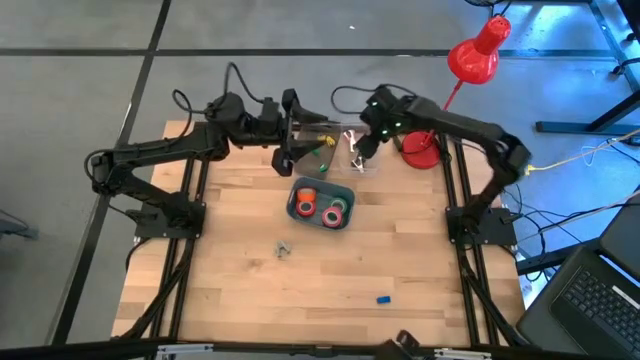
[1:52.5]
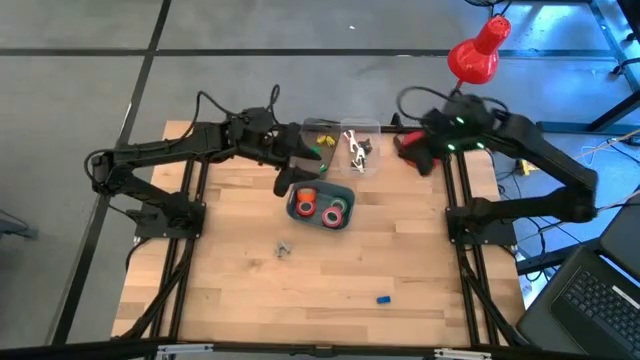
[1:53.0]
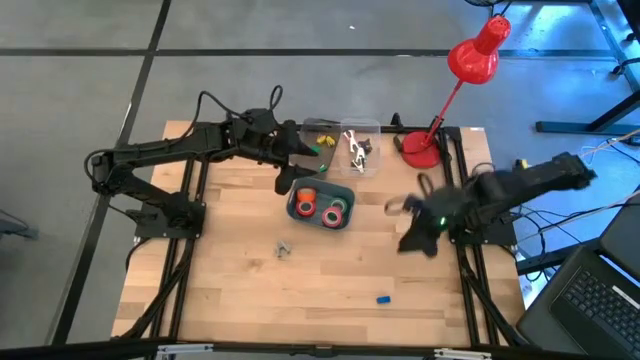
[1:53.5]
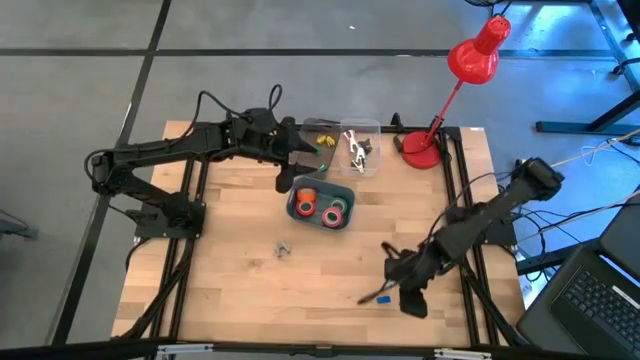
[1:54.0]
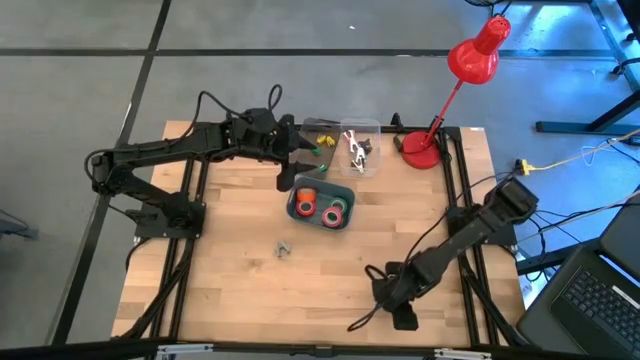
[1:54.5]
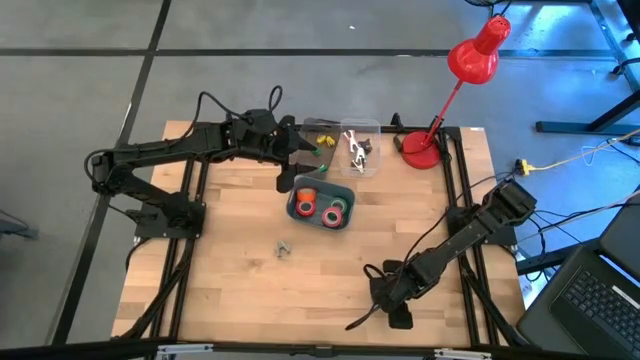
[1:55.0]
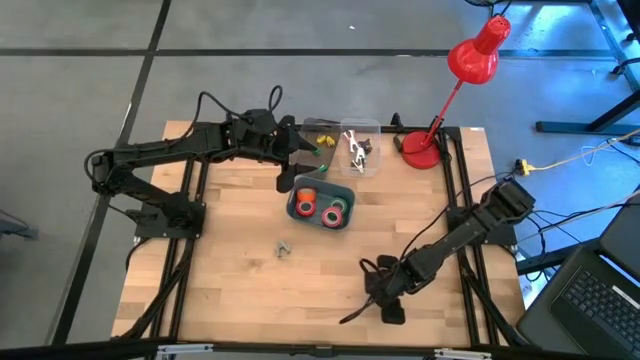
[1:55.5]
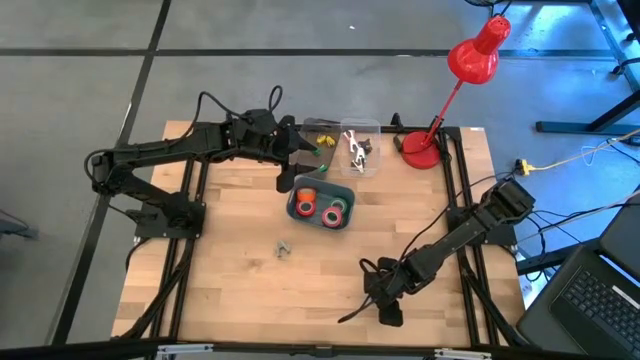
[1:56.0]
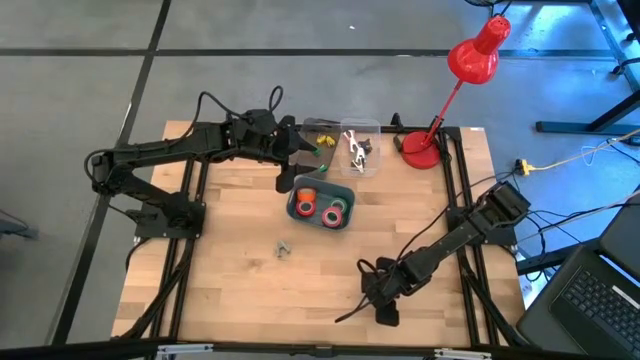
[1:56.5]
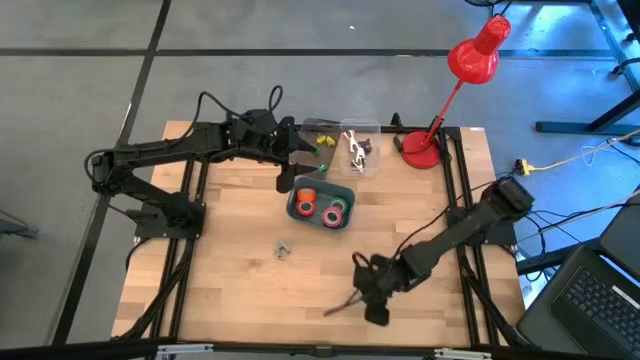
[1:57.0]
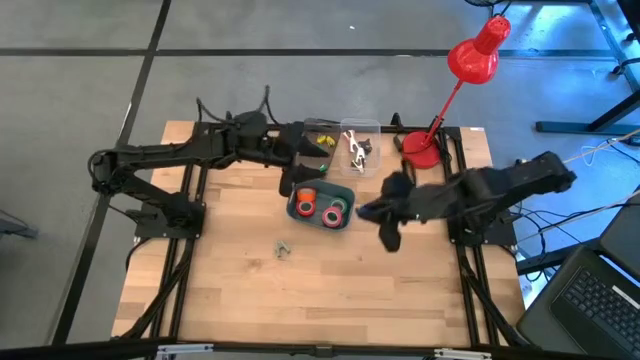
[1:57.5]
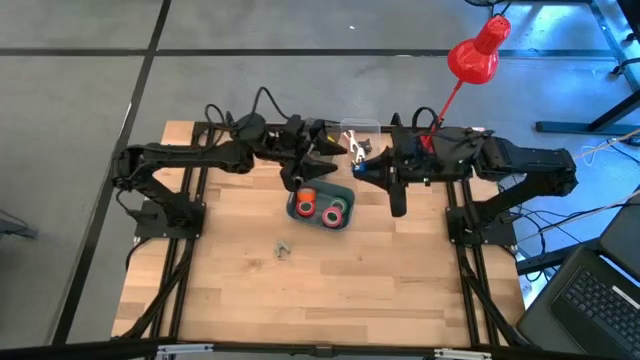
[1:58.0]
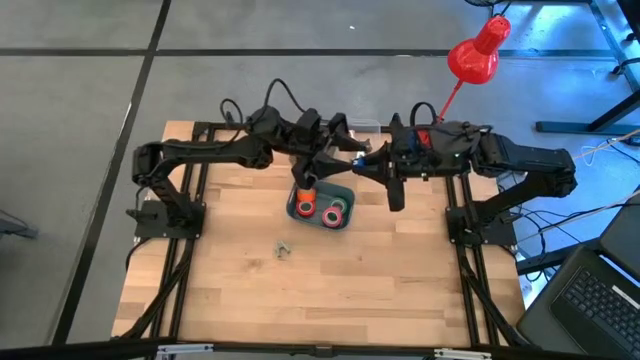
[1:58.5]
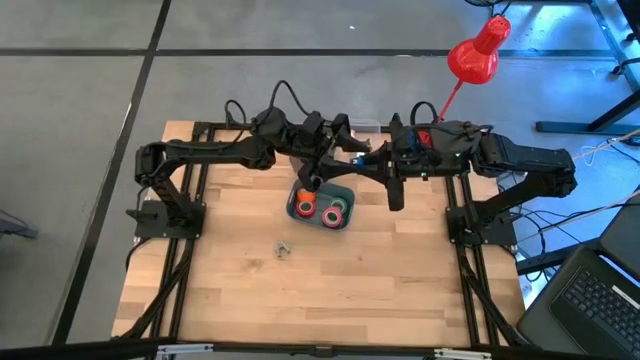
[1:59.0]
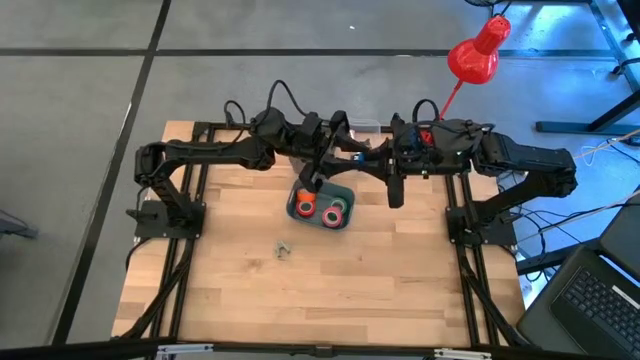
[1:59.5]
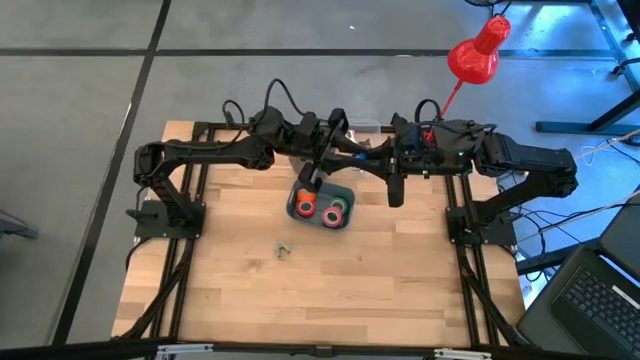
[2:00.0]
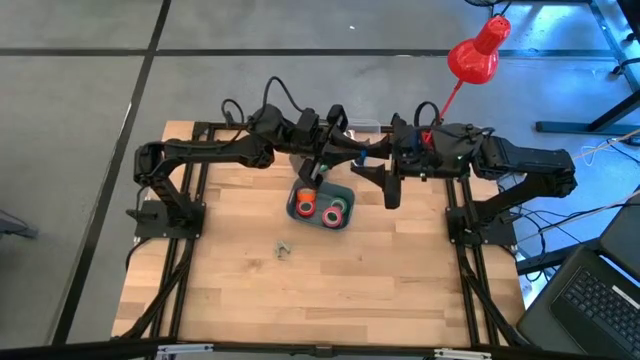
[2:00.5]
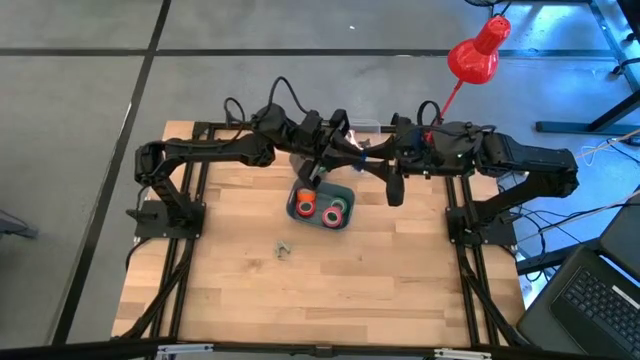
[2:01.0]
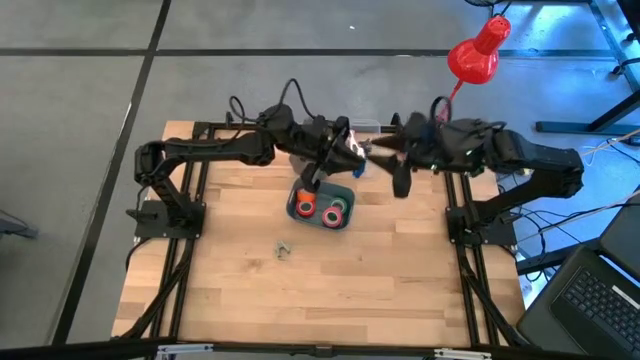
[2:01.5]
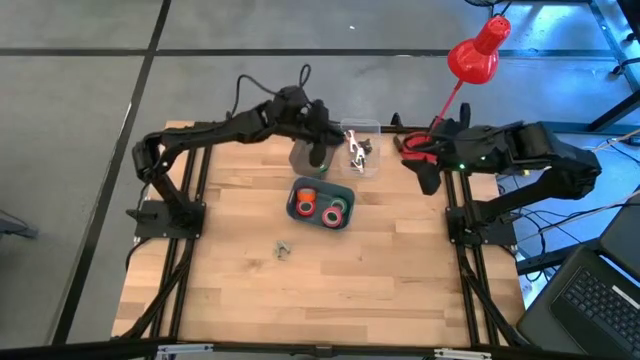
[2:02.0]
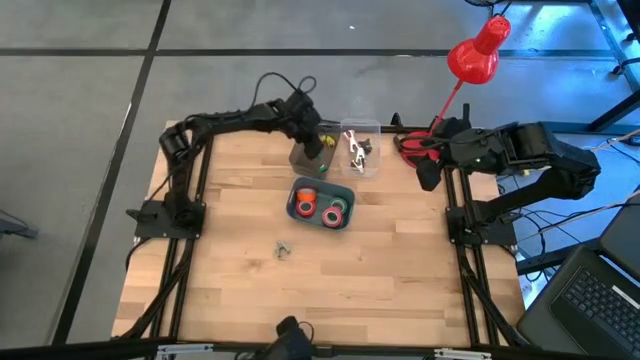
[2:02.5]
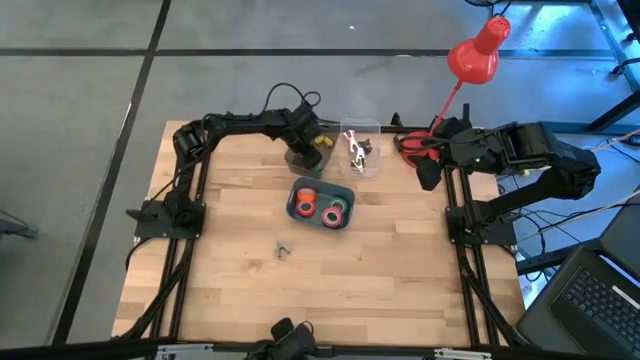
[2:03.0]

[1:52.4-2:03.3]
Task: Pick and place Stapler, Stapler remover, tape
Put the blue stapler into the black bin

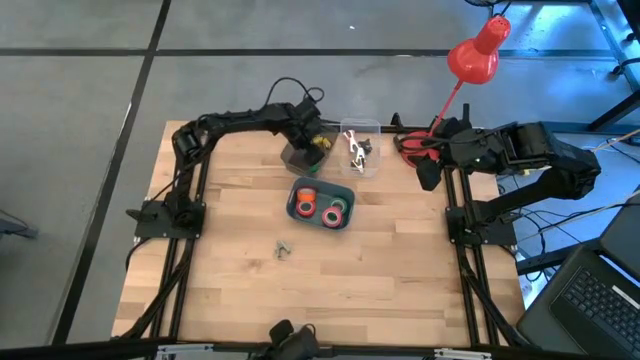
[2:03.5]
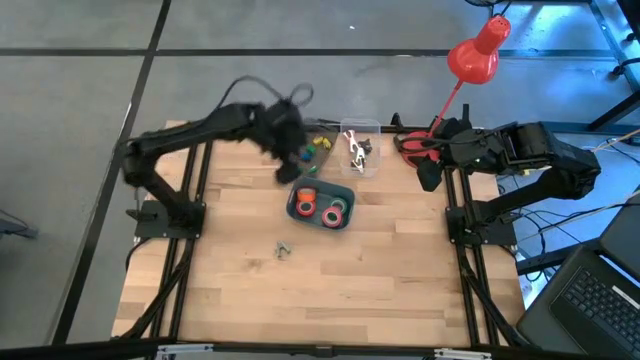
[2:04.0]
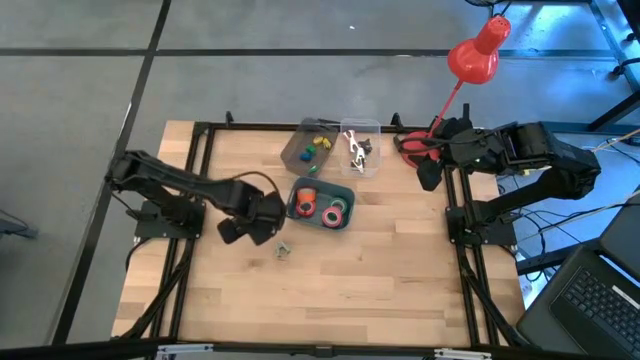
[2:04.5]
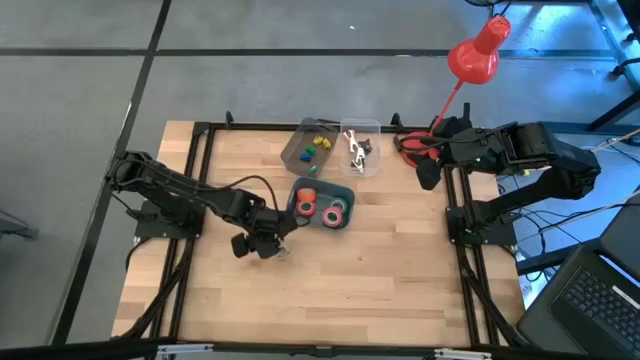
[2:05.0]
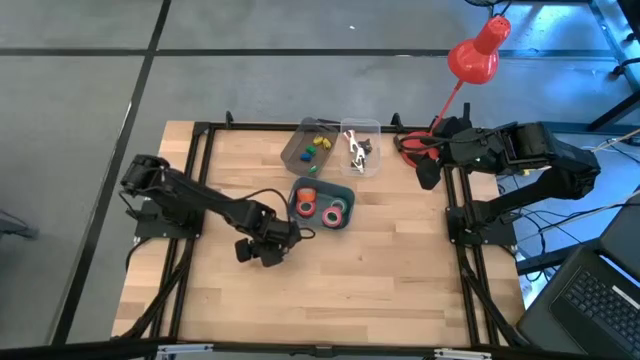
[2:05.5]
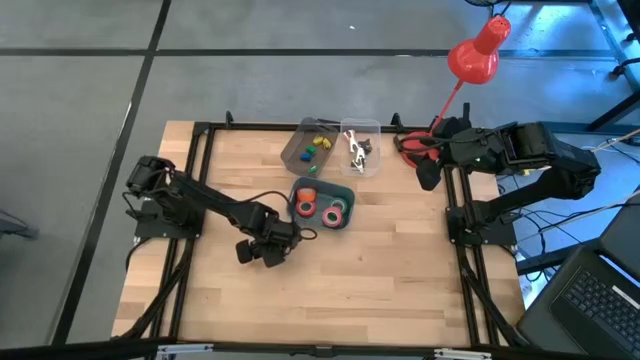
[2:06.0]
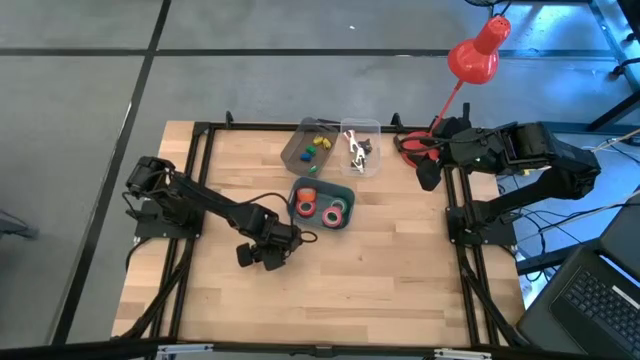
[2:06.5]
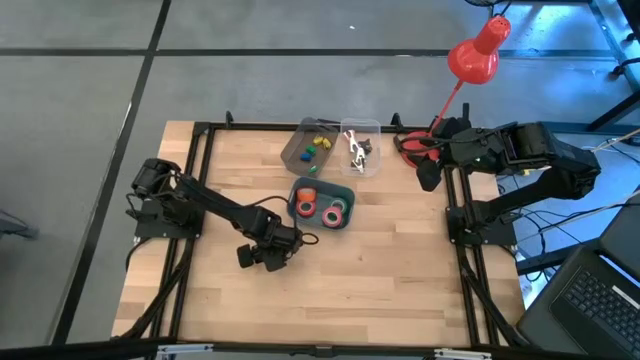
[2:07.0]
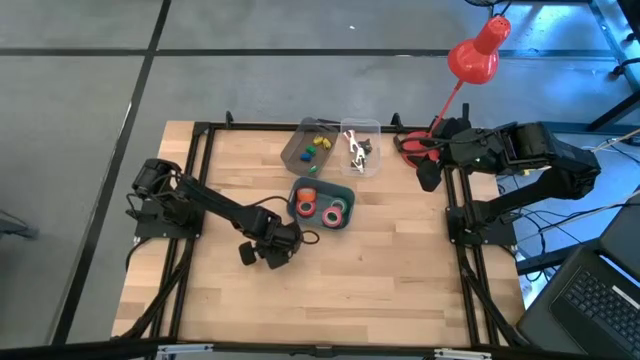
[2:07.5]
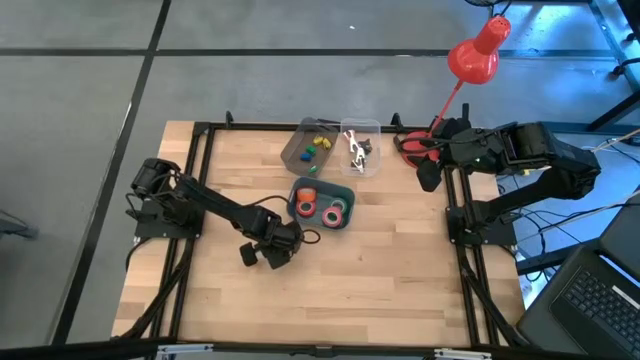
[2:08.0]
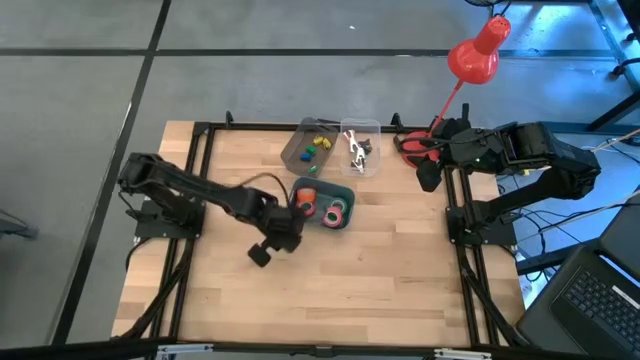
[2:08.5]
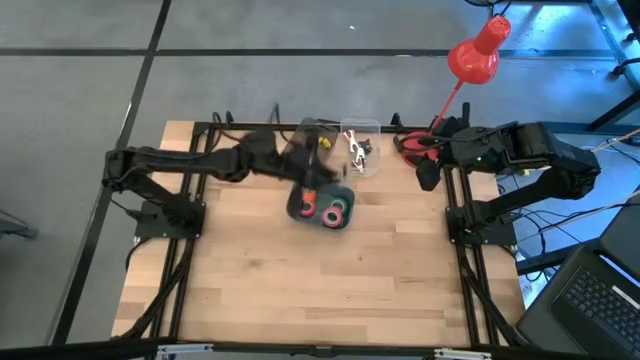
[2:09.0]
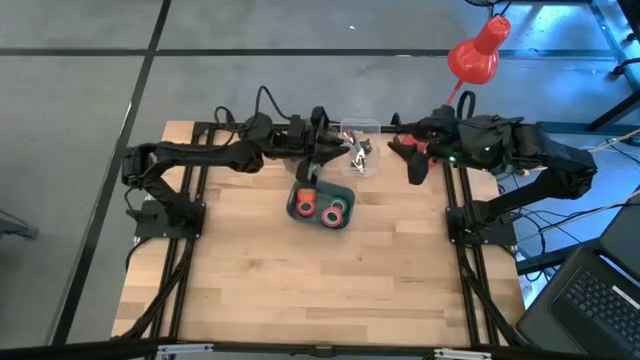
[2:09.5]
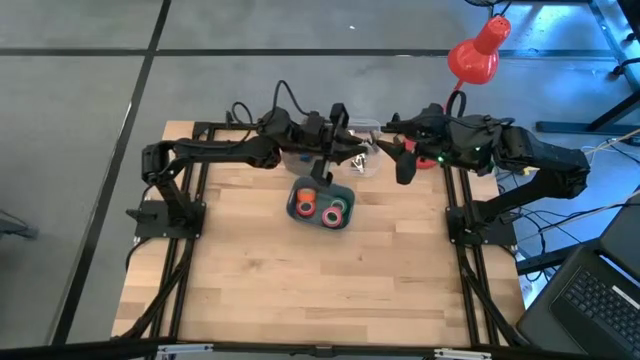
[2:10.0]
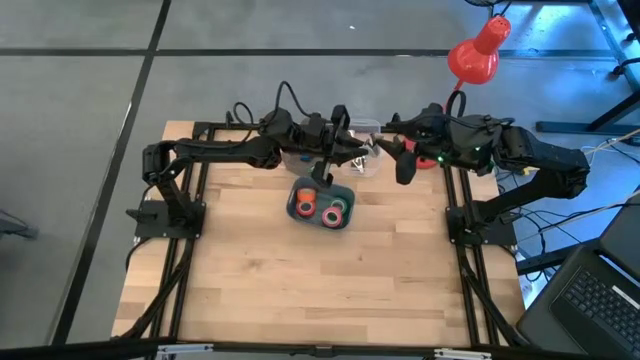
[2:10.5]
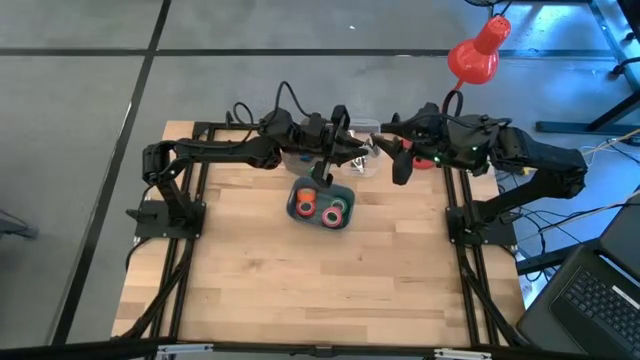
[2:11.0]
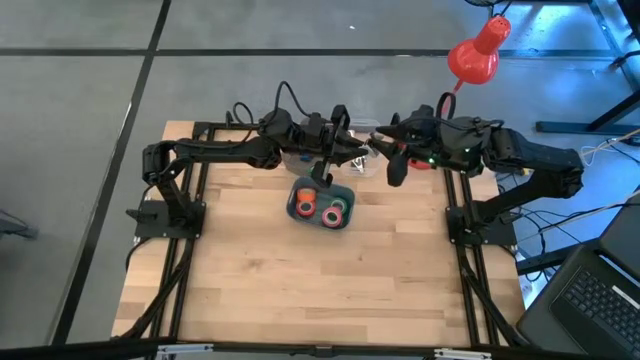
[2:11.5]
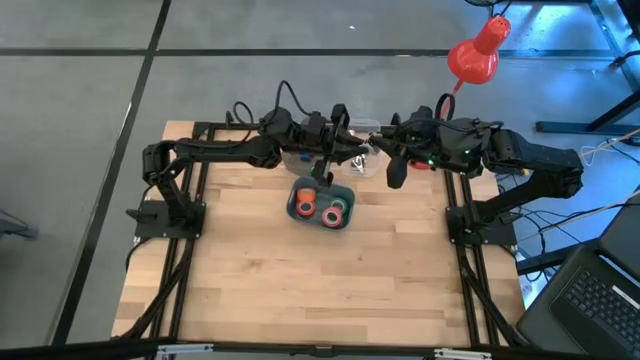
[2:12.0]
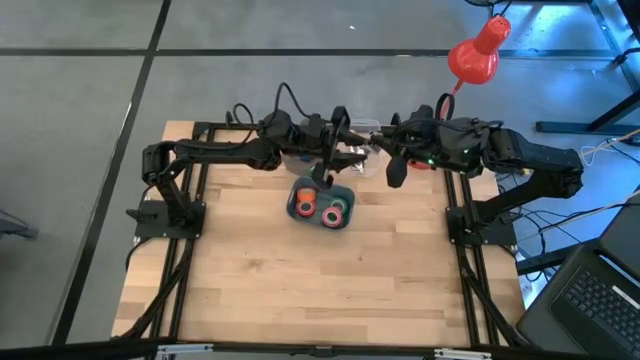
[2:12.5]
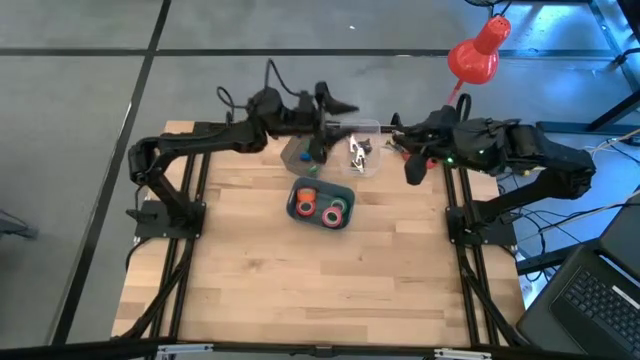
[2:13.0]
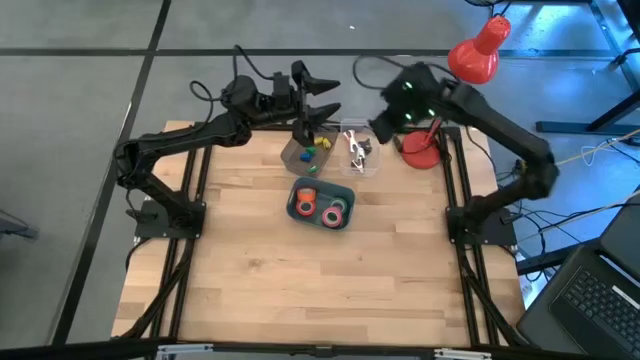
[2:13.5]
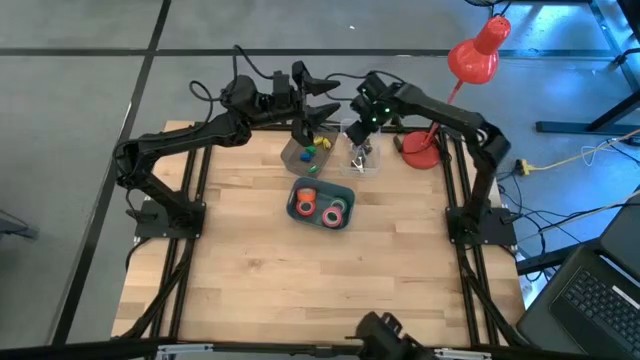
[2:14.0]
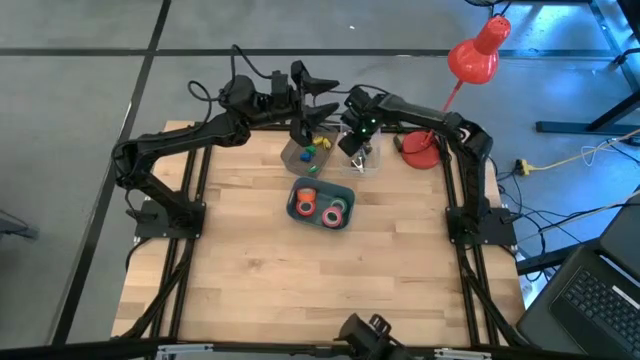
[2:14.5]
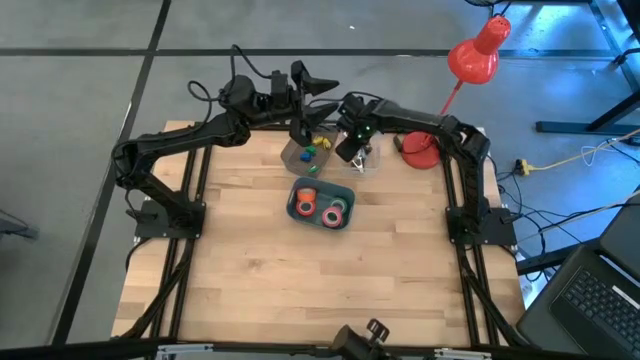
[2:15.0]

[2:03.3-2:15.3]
Put the grey staple remover into the white bin
